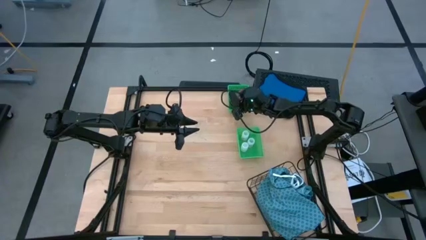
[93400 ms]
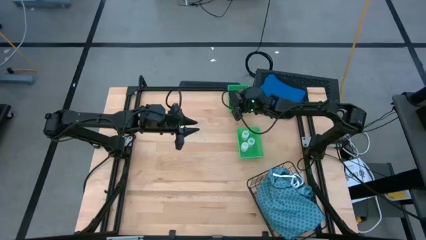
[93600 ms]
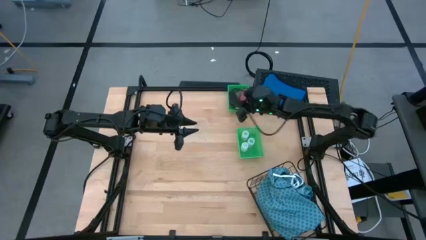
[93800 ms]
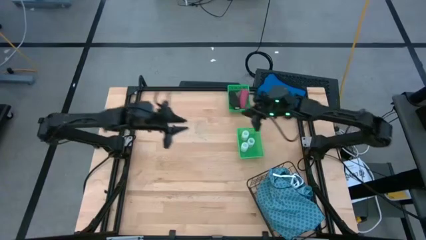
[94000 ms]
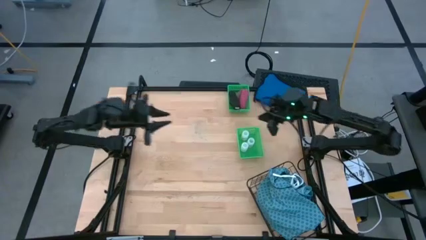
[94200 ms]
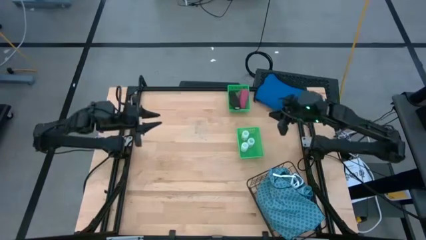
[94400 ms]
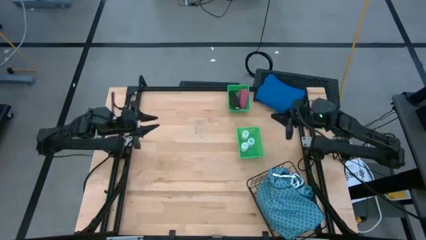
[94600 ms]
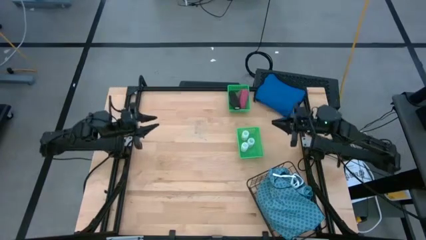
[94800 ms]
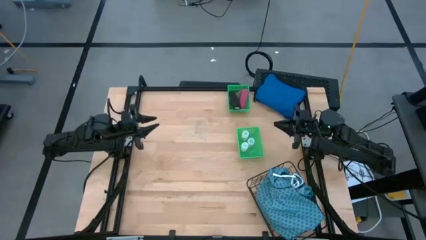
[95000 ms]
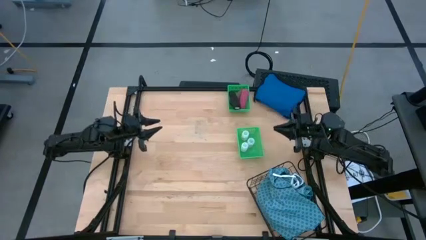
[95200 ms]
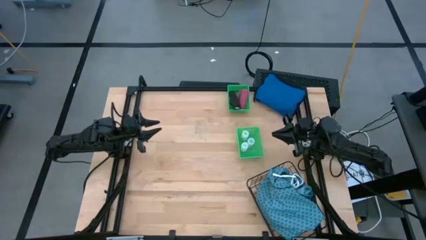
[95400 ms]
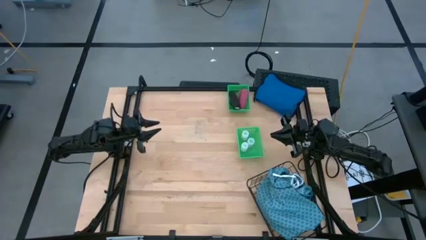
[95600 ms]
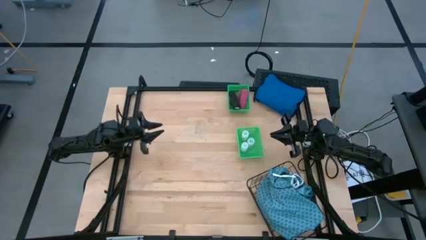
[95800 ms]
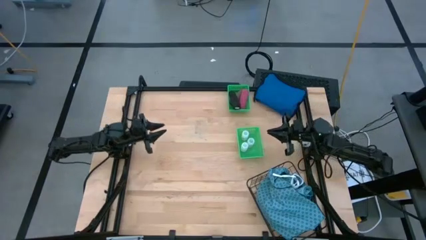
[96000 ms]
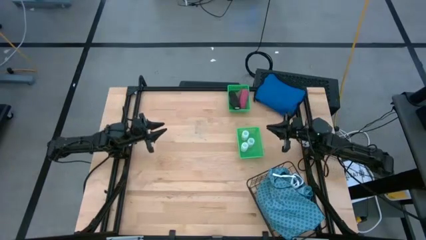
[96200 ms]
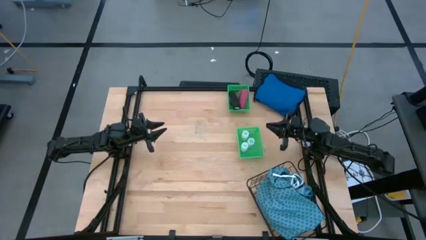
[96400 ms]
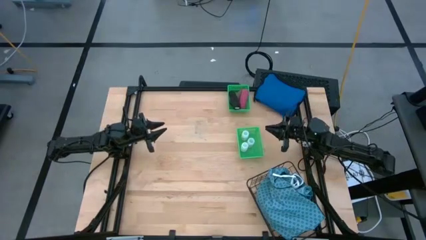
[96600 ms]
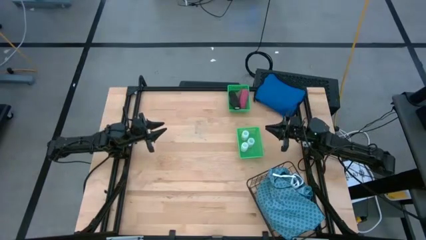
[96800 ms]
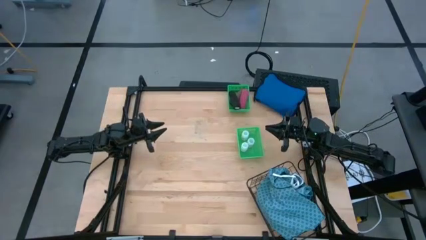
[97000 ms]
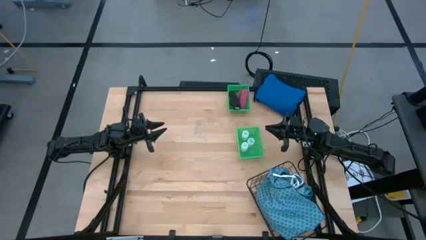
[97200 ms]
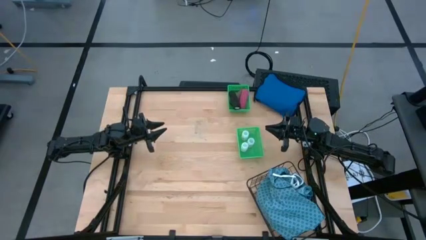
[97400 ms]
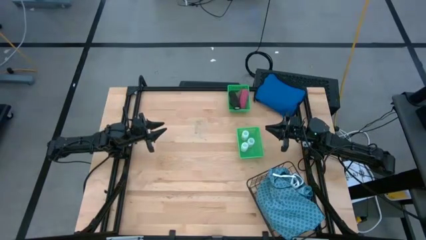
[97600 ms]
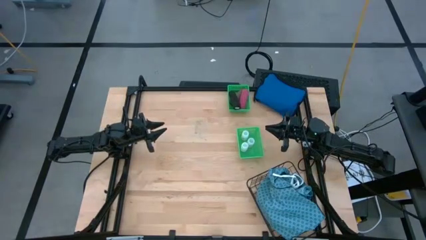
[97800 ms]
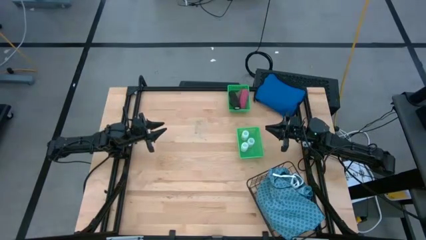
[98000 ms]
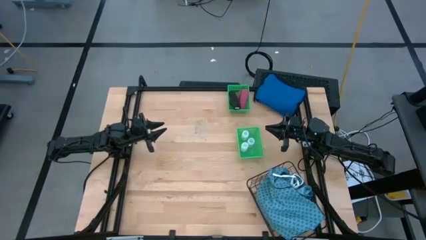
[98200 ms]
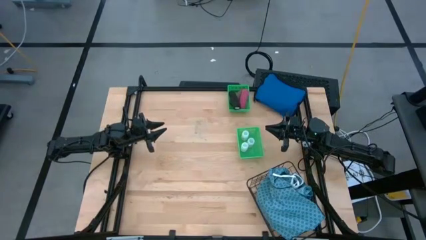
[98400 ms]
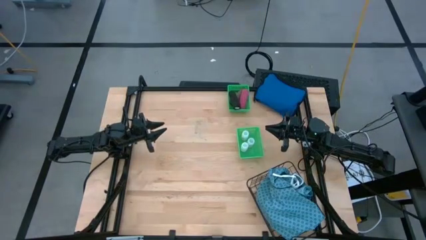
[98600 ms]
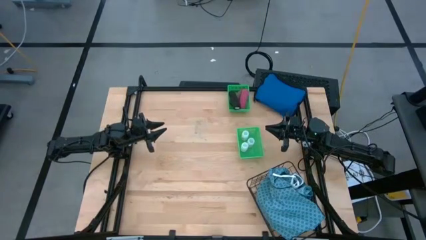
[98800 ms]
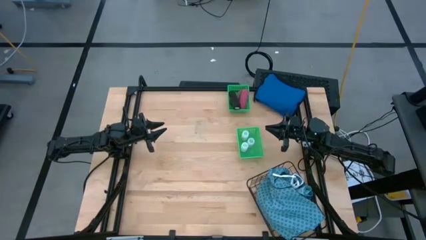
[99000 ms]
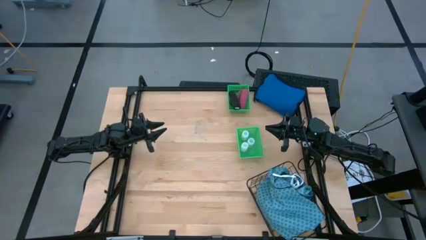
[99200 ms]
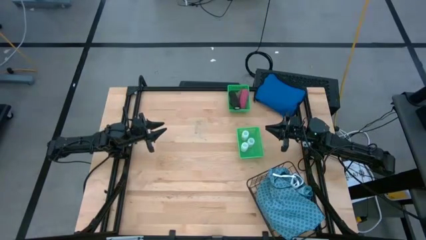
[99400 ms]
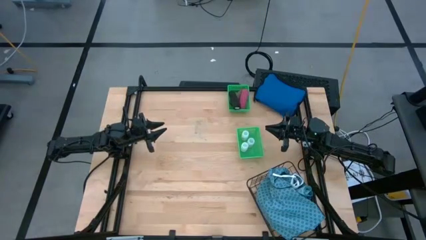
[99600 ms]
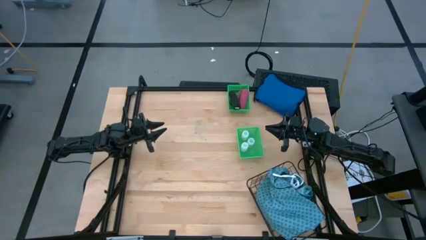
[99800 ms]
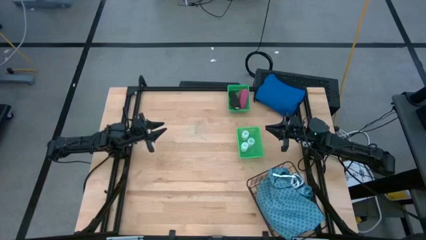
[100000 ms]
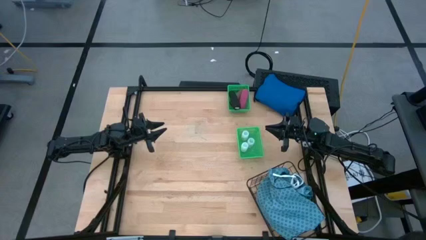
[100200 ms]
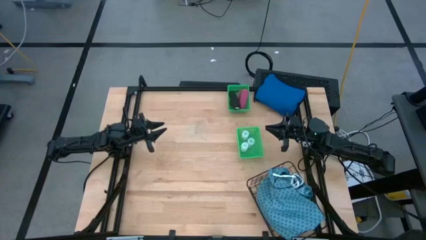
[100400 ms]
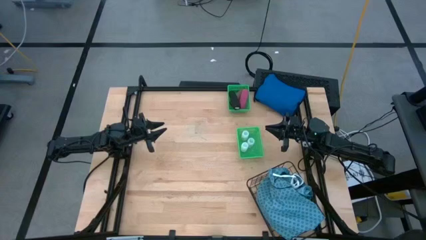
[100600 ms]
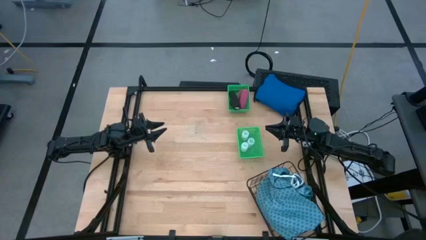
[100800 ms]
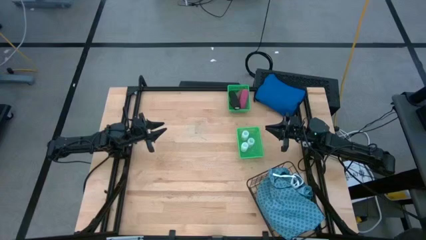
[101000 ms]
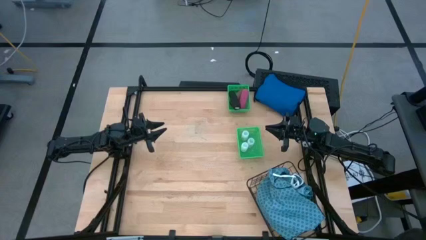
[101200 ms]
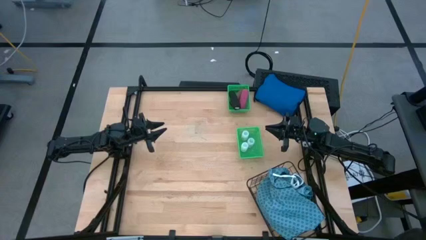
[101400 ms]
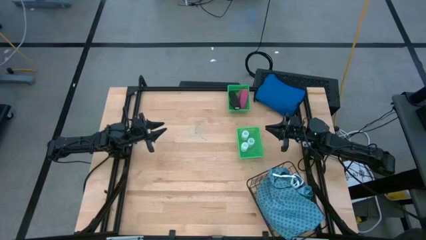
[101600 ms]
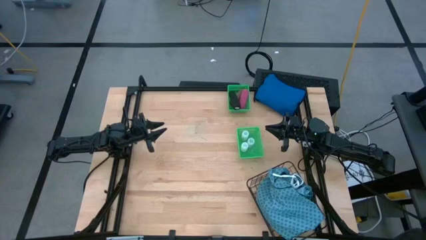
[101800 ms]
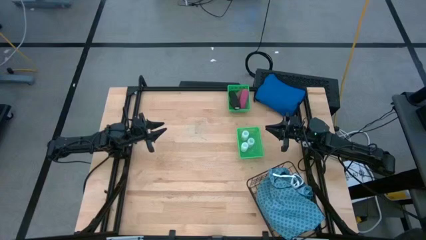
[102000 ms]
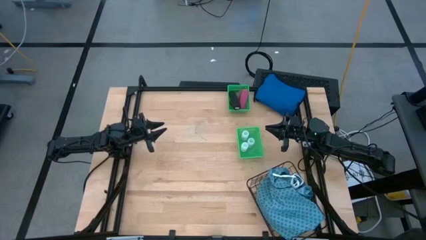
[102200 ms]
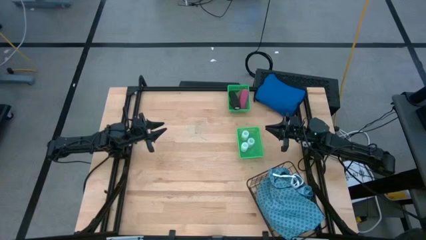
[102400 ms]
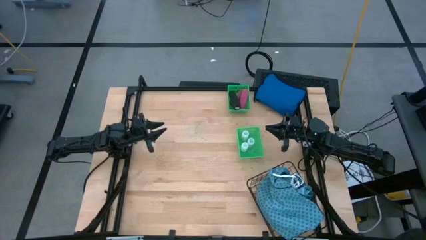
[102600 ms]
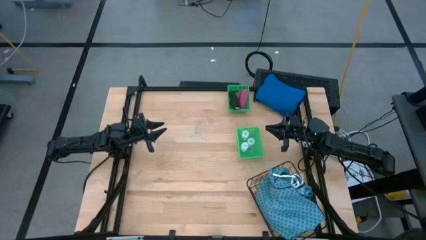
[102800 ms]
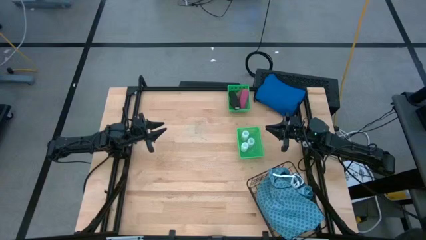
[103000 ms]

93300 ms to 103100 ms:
Task: Pick & Place Medicine items
Return to Home Position

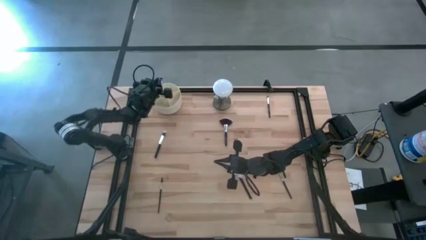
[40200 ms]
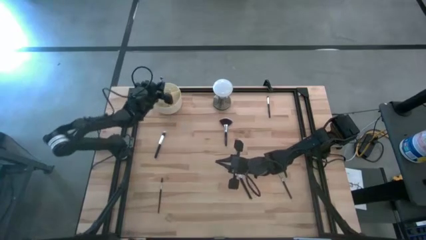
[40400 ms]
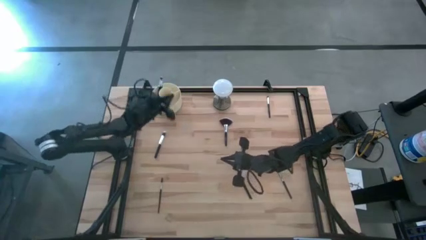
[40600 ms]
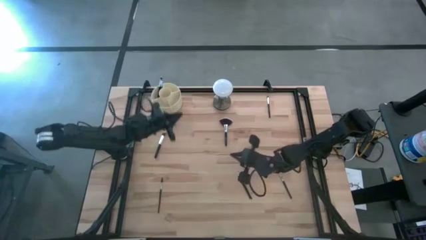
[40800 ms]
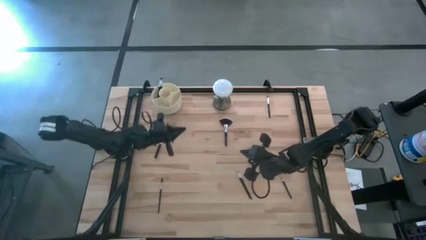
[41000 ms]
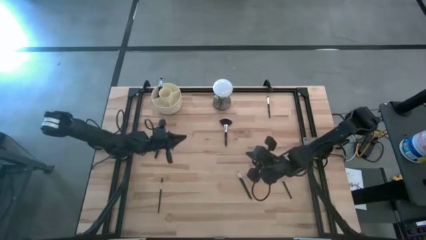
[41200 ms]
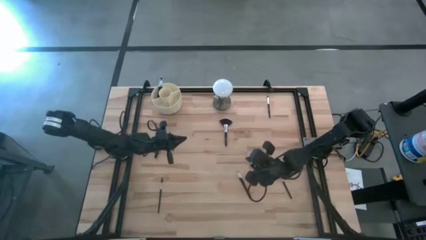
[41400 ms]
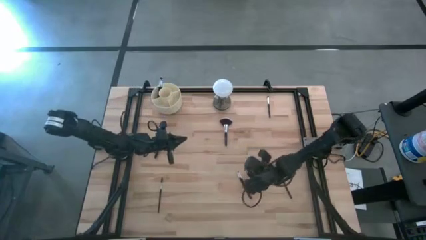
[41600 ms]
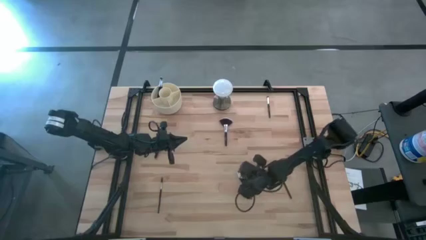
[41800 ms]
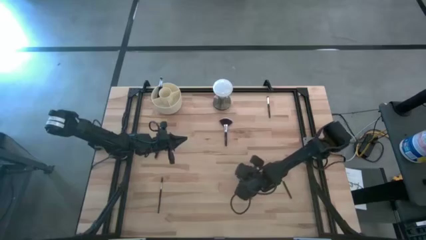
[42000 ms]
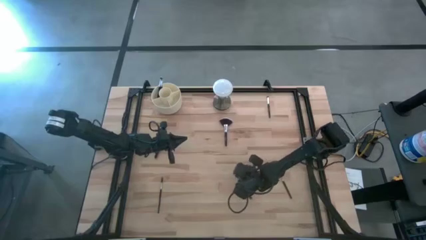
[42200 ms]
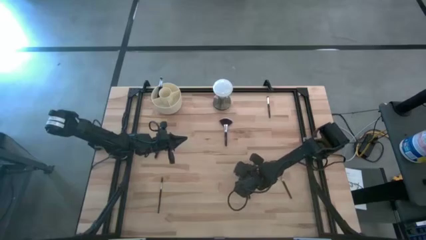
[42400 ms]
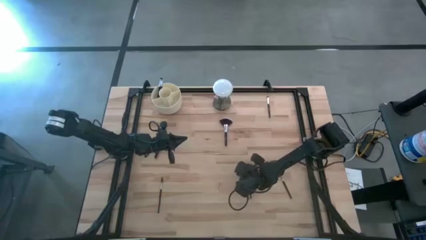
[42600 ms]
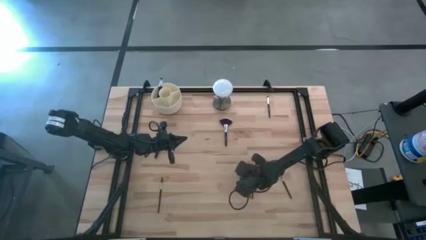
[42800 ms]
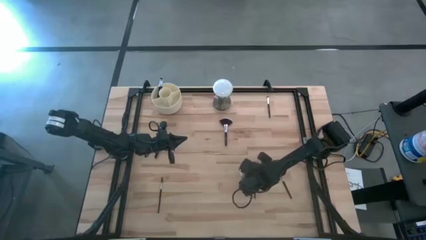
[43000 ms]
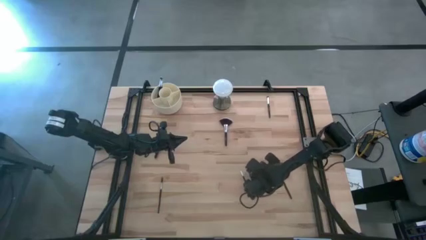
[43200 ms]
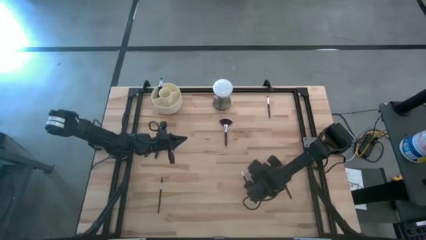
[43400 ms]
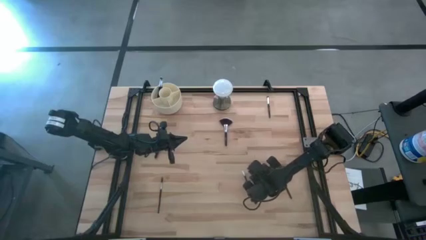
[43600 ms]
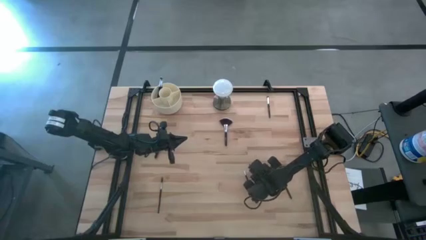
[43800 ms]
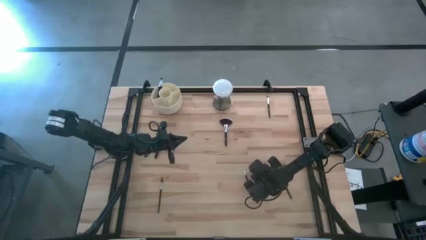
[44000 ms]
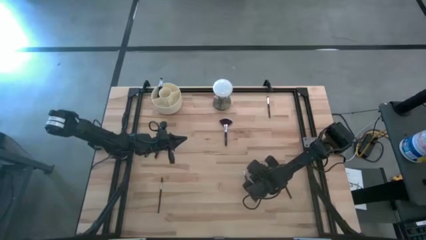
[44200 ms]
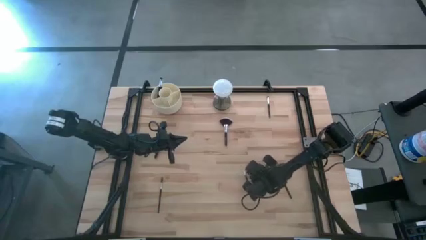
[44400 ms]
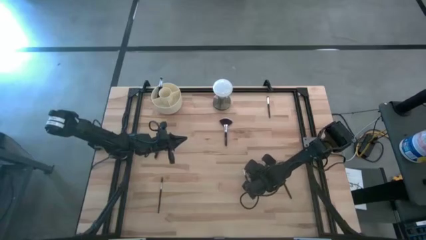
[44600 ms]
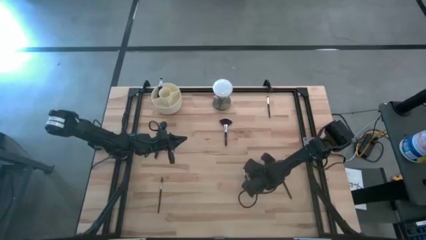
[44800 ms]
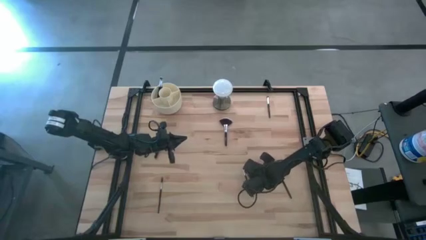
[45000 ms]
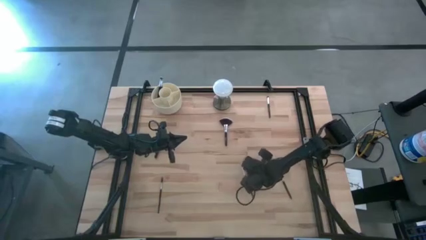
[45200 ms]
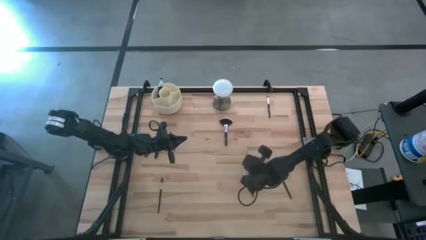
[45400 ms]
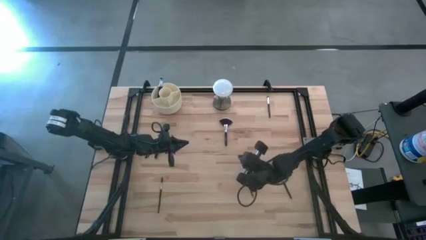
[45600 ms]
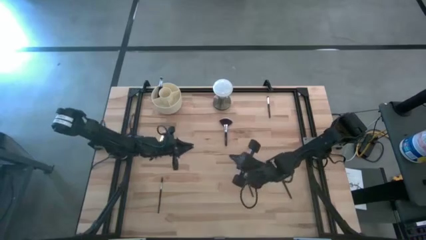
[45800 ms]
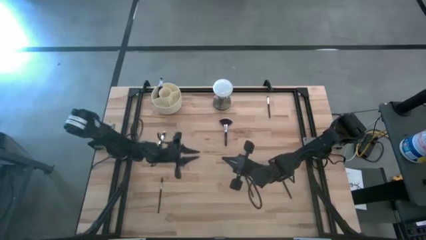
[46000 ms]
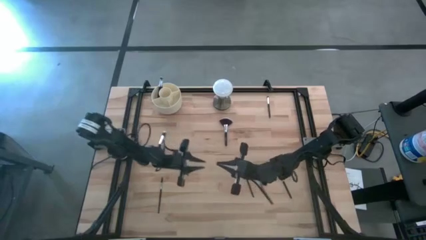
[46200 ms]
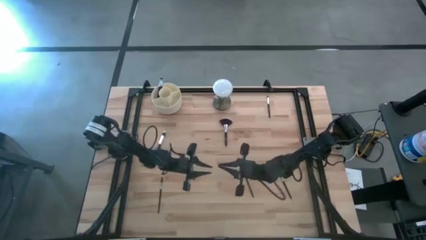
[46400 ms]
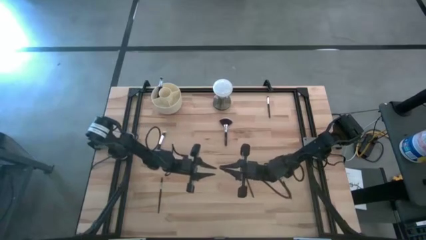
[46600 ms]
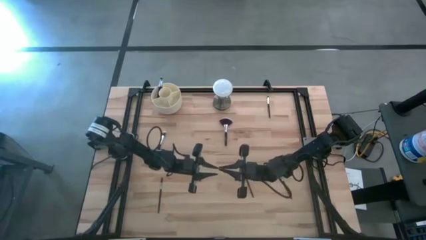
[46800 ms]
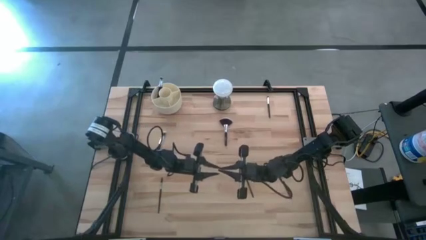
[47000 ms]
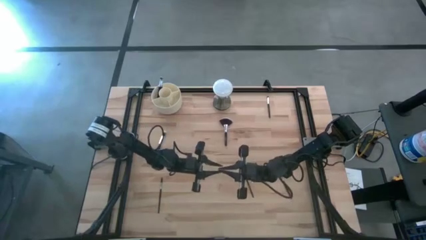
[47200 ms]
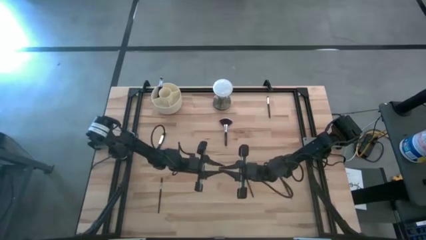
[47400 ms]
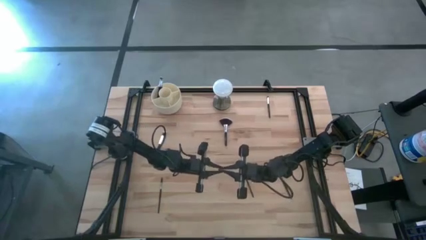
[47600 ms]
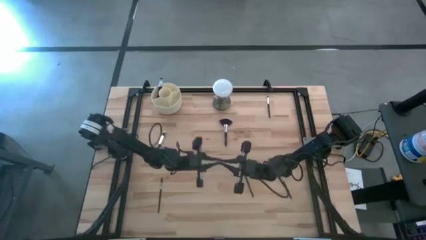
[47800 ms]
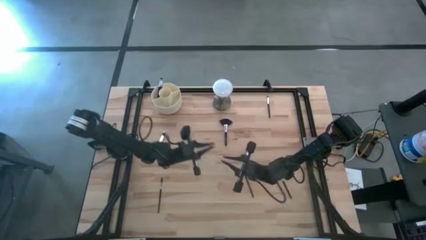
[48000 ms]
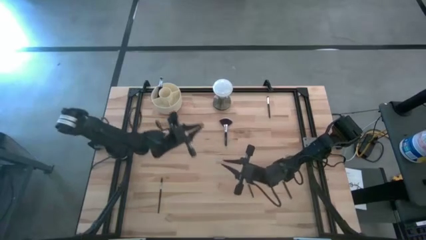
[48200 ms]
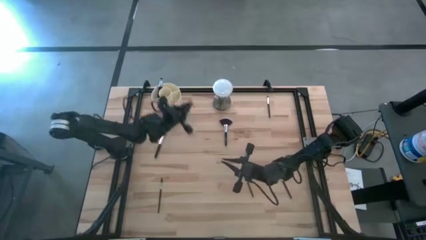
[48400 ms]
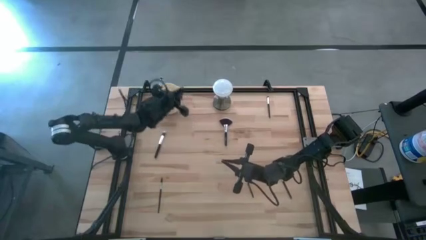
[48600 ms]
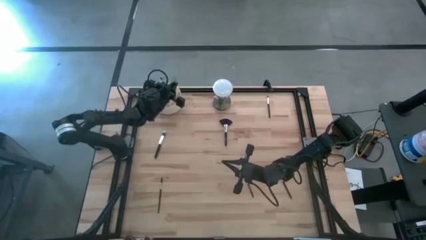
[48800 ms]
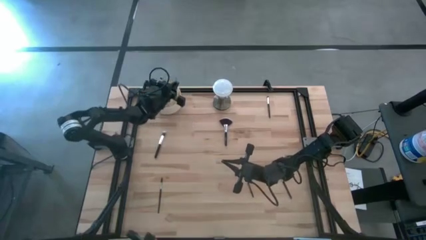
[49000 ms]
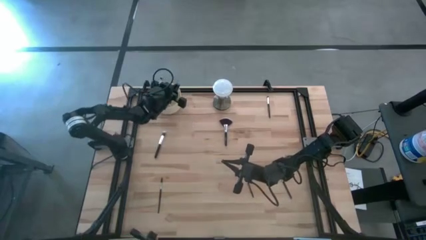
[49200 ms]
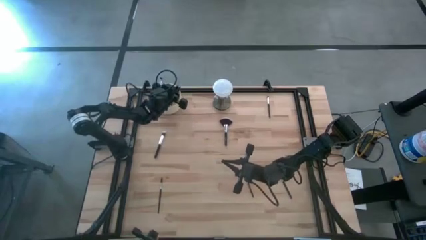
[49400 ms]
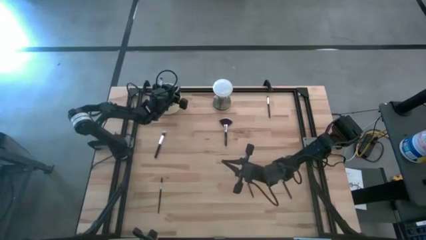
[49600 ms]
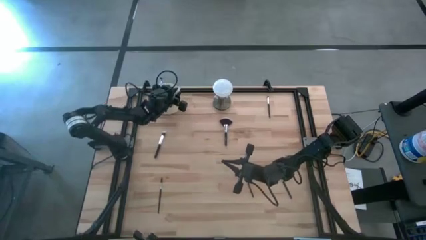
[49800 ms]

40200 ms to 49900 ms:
Task: Put items in baskets/containers
Put the eyeshadow brush into the organizer
